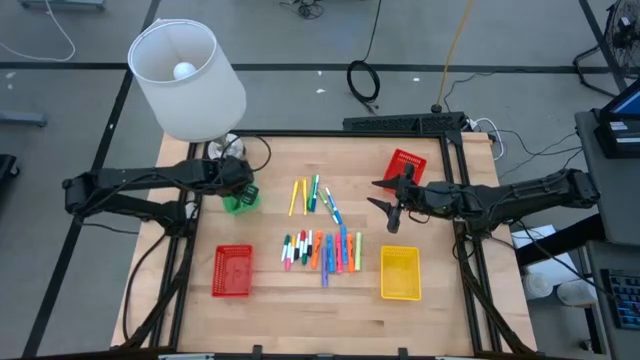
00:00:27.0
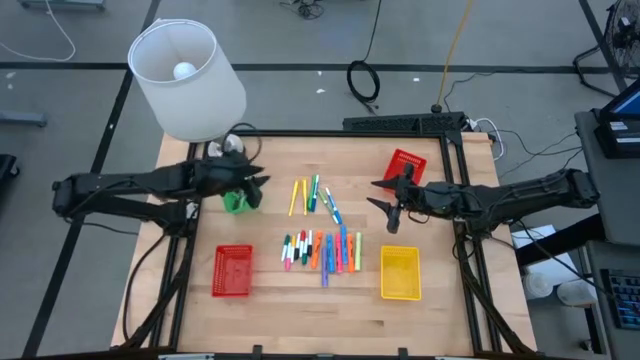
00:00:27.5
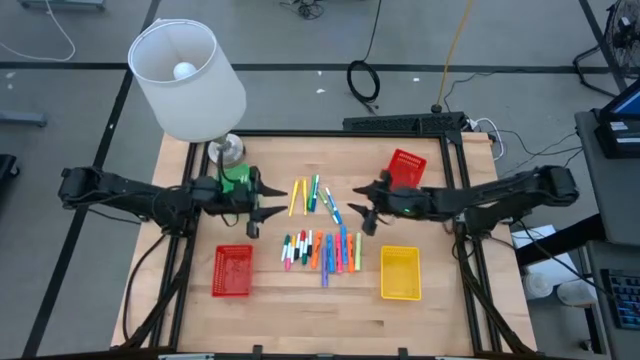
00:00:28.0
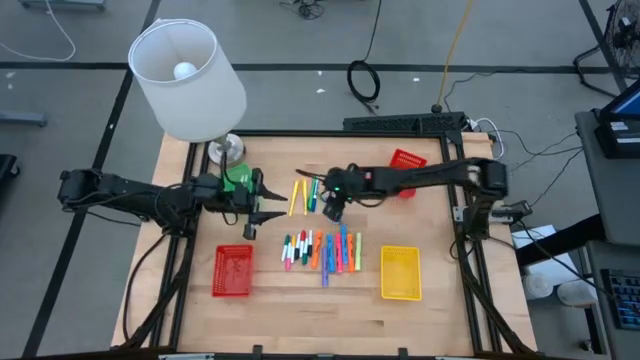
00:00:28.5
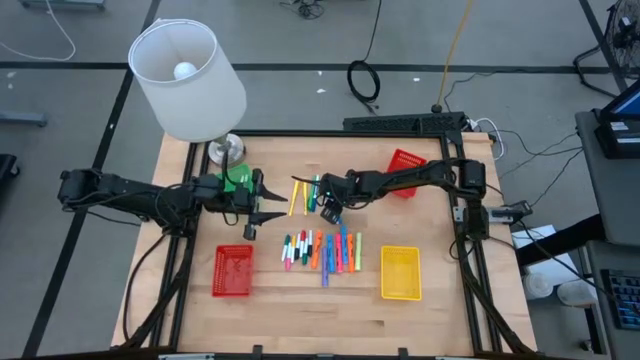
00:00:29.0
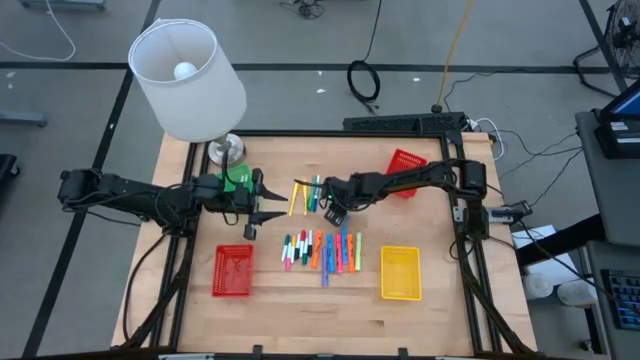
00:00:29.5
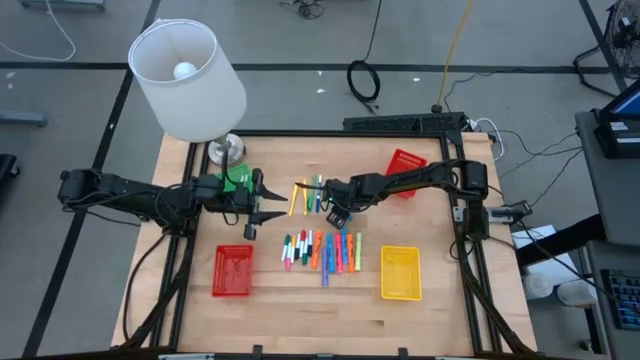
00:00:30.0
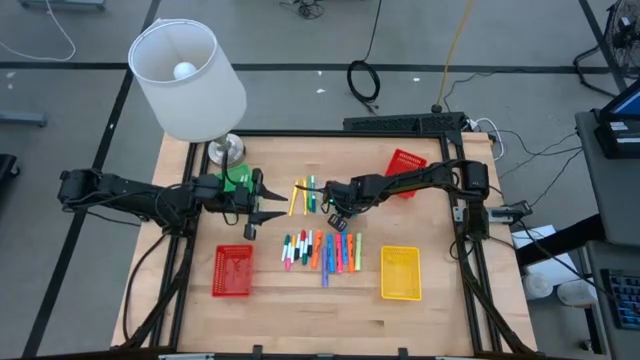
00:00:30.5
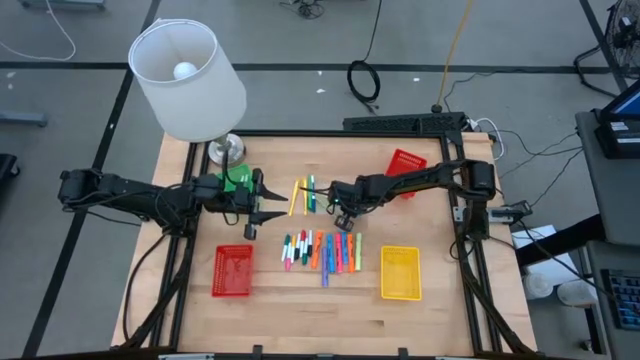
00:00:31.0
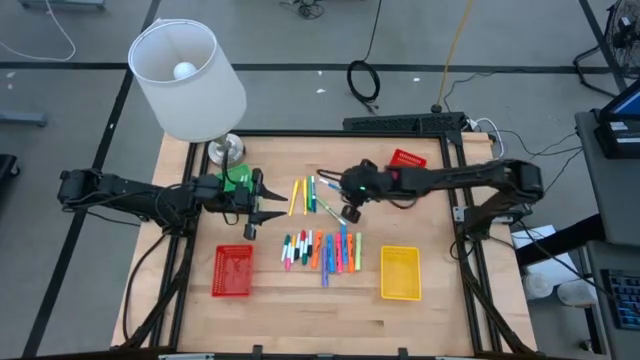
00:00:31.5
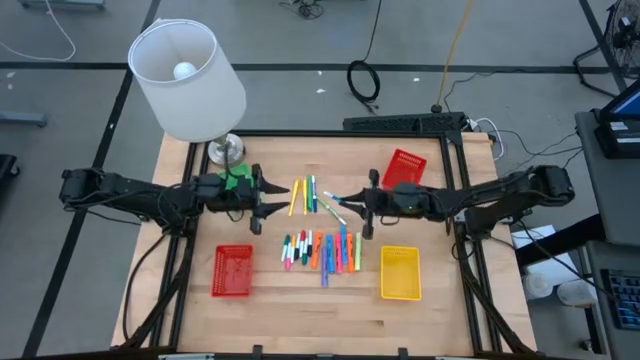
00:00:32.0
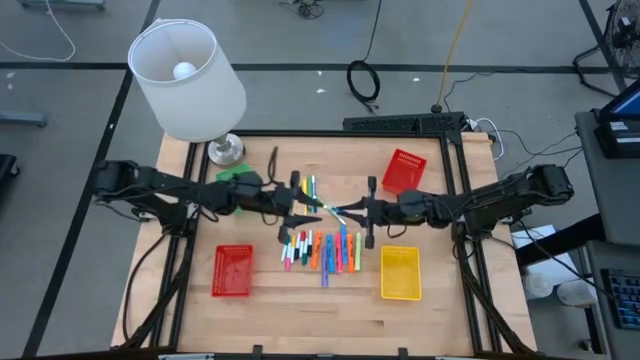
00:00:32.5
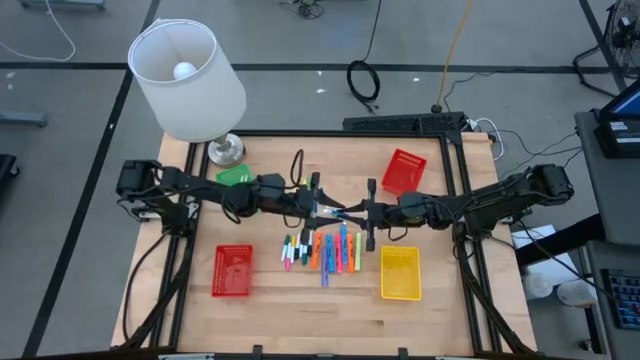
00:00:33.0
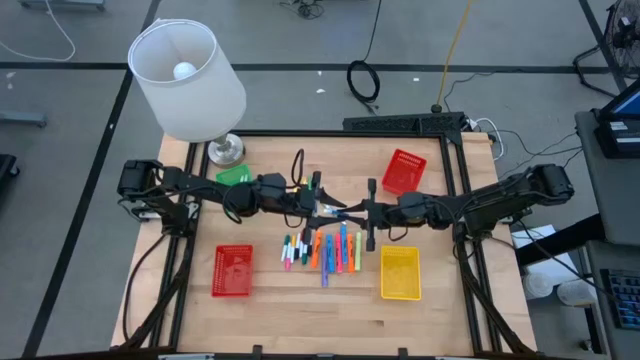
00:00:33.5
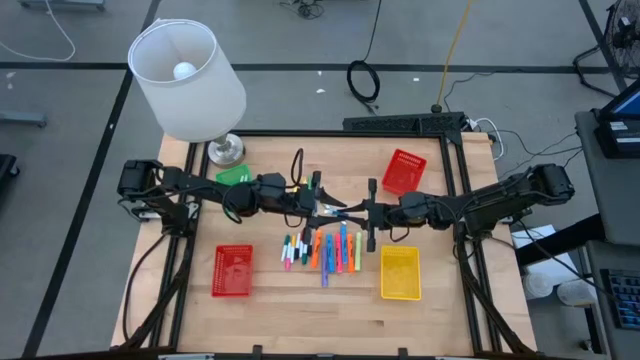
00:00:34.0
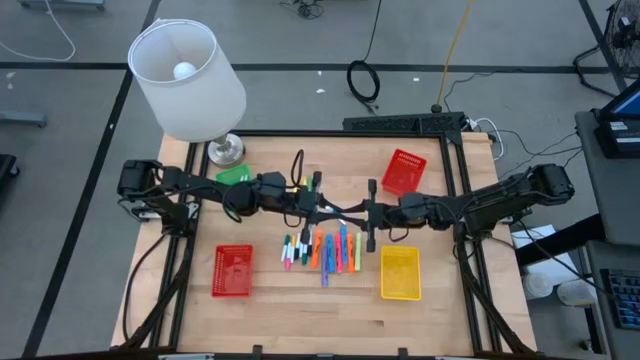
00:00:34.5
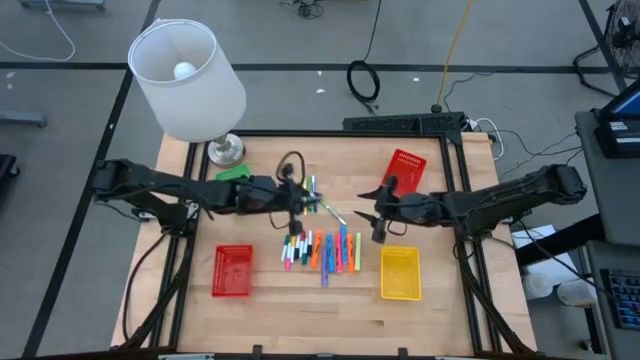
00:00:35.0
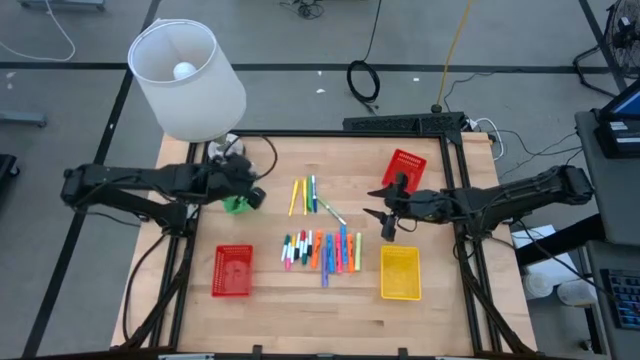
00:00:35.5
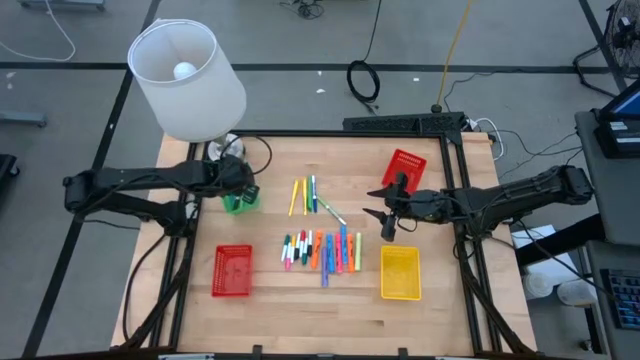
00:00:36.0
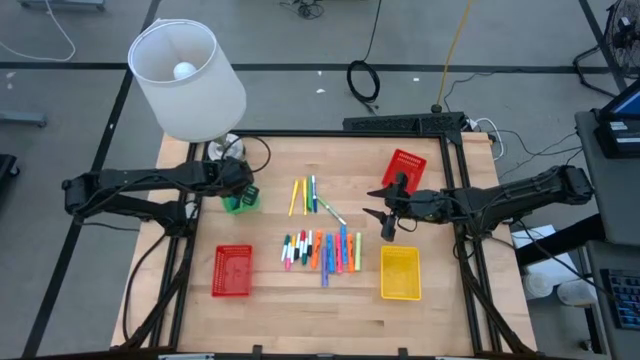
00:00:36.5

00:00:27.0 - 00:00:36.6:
Task: Pick & Place Markers
Put the blue marker pen into the green basket

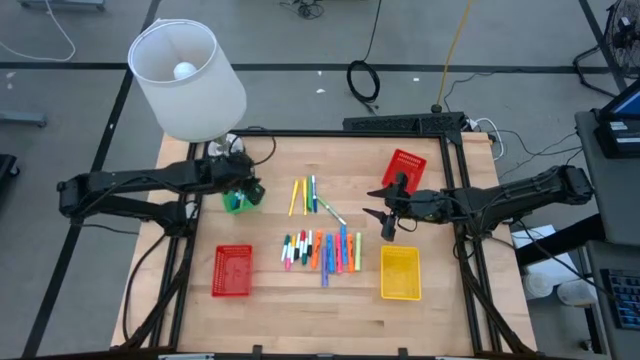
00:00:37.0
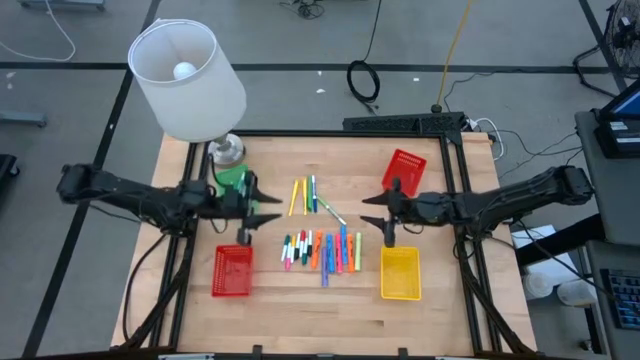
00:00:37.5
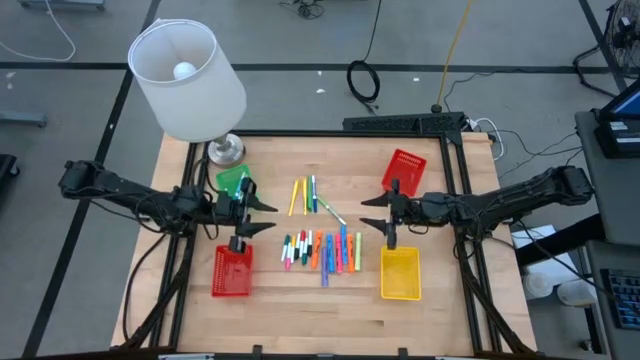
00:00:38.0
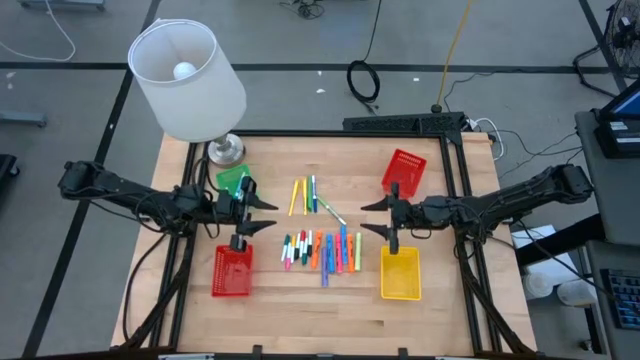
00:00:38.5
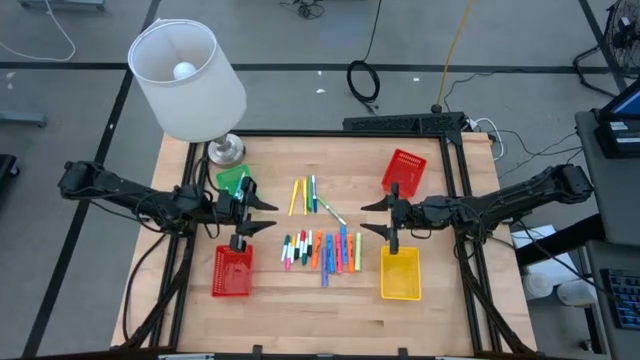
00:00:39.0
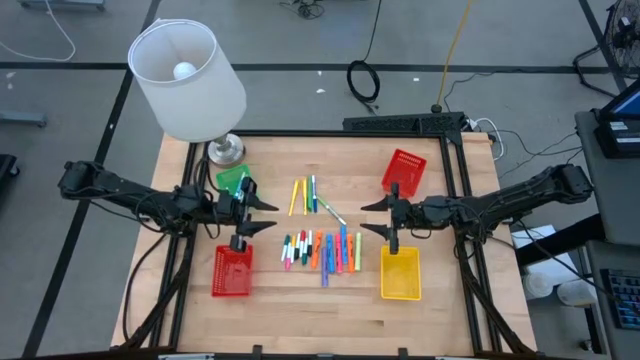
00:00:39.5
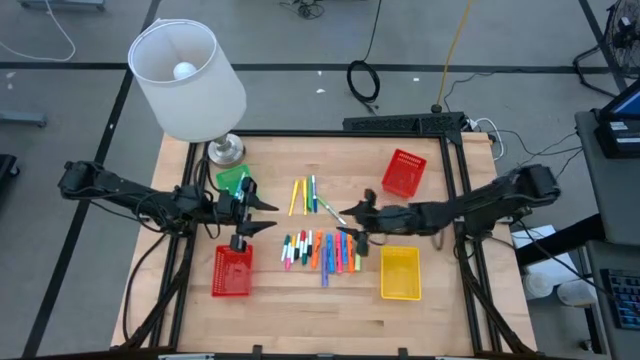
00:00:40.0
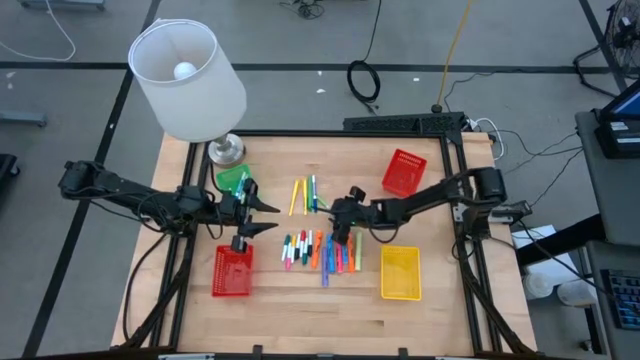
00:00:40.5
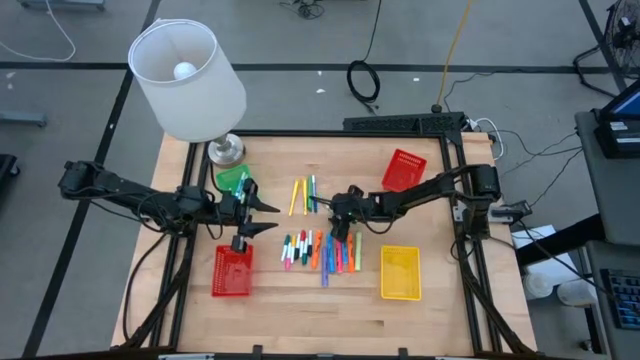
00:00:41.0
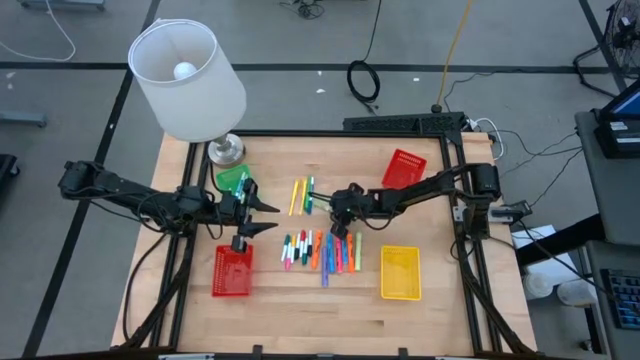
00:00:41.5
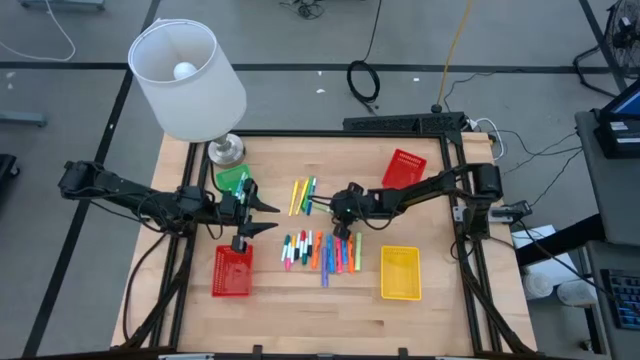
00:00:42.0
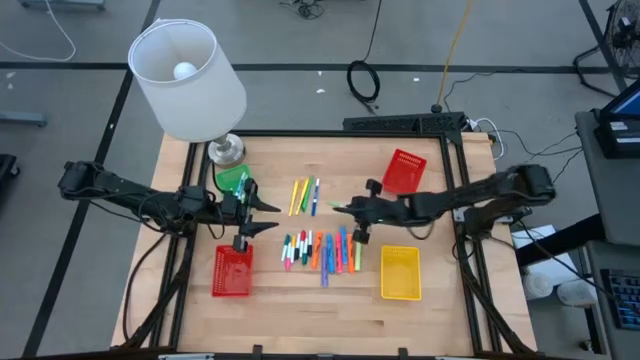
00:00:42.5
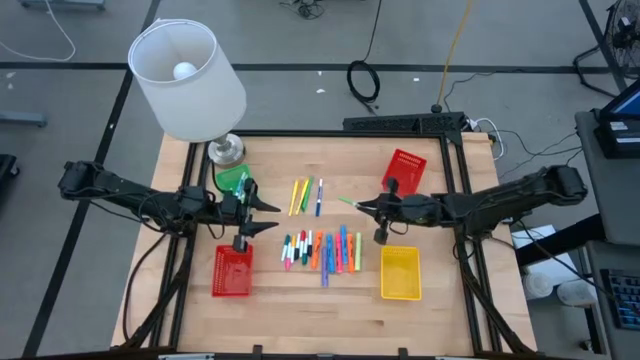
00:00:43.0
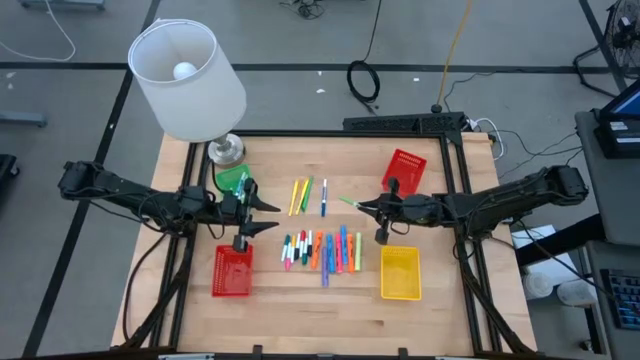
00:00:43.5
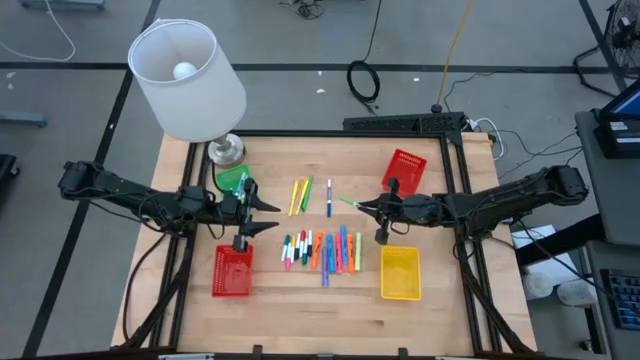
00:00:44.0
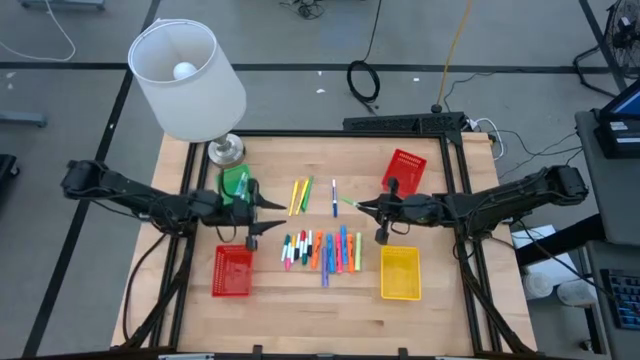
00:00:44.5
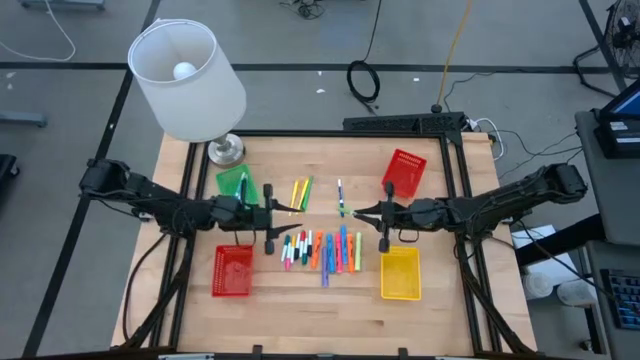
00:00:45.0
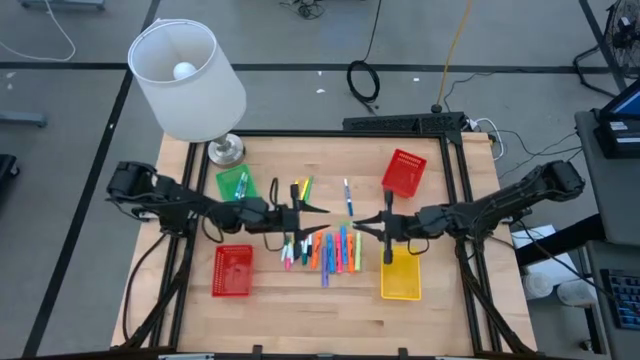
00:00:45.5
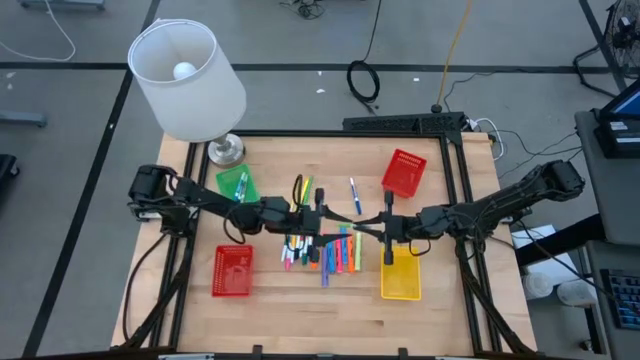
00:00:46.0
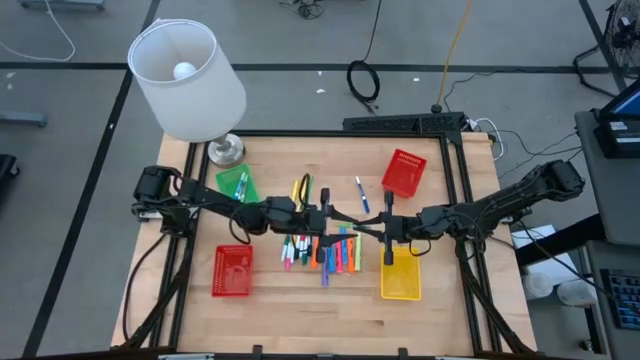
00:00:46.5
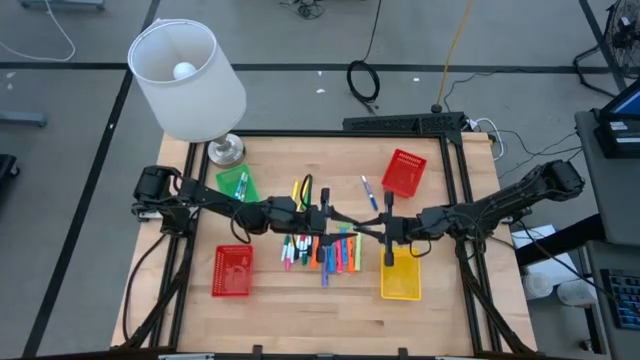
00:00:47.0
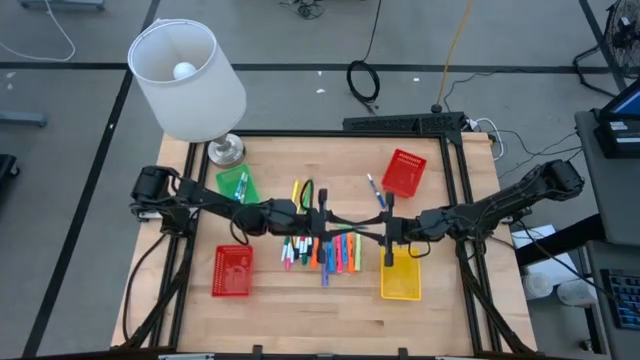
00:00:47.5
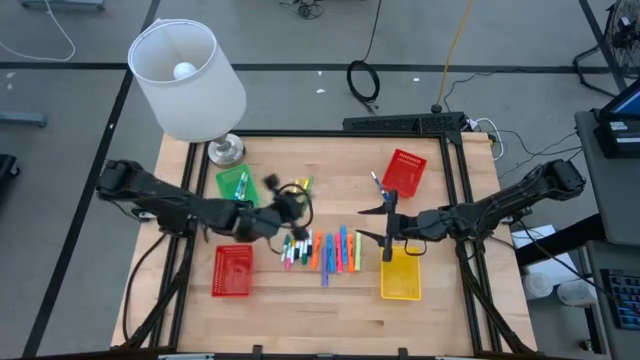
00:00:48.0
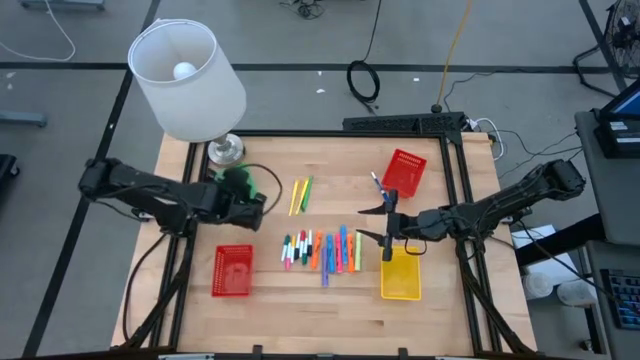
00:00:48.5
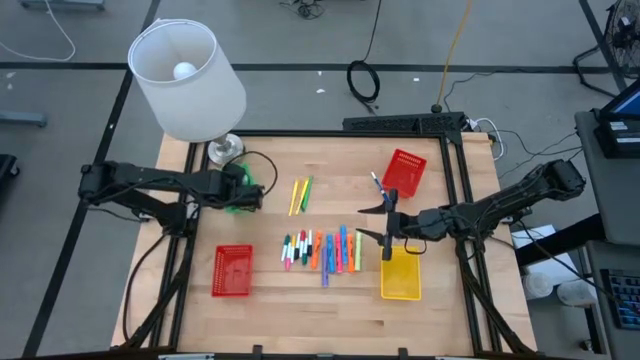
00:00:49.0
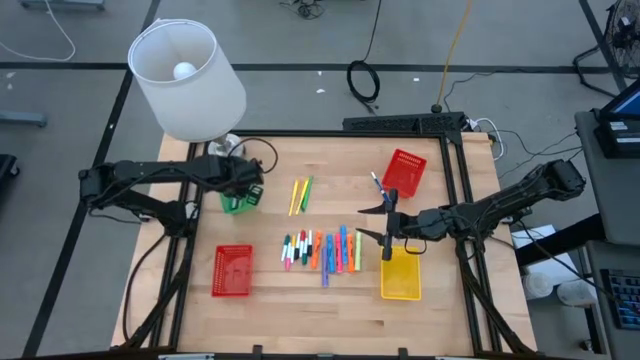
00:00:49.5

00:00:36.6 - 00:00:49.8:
Put the right green marker pen into the green basket
